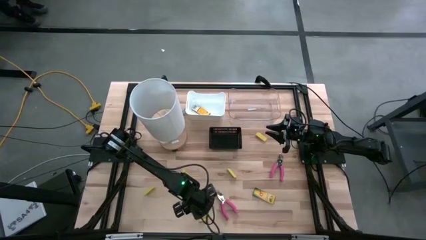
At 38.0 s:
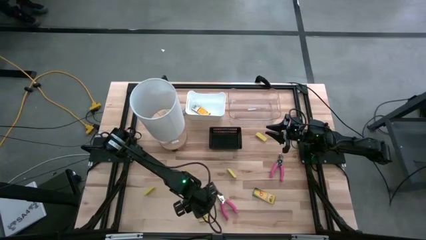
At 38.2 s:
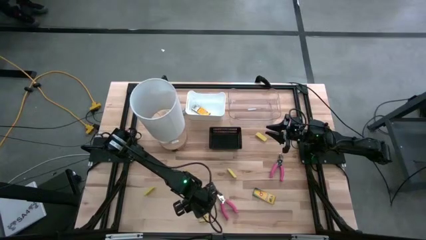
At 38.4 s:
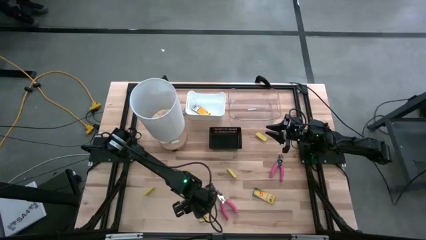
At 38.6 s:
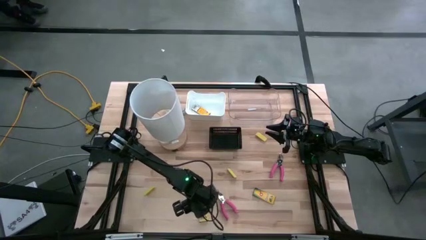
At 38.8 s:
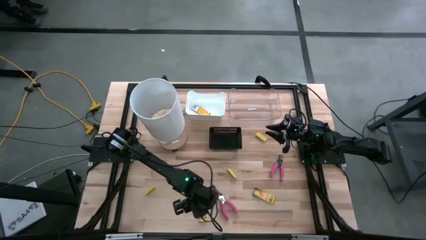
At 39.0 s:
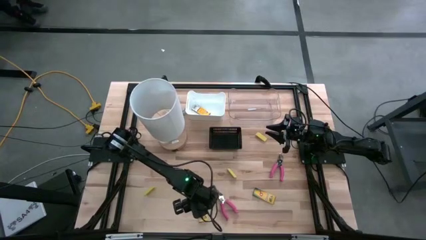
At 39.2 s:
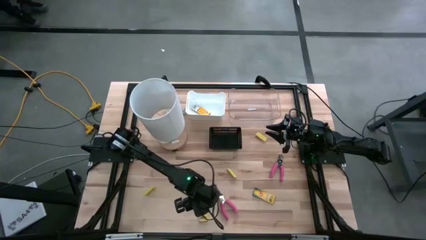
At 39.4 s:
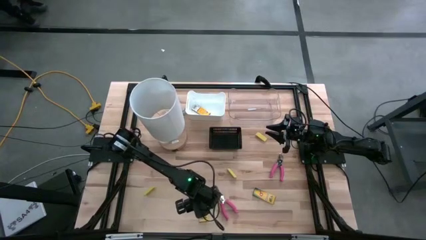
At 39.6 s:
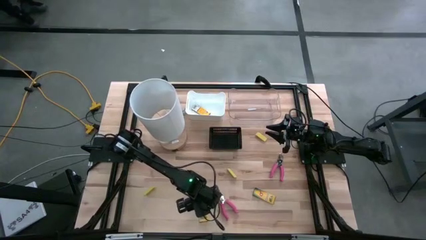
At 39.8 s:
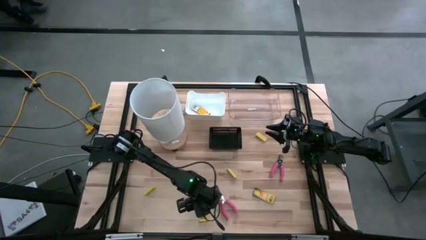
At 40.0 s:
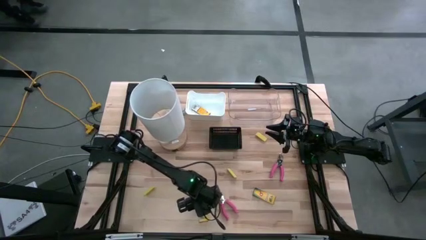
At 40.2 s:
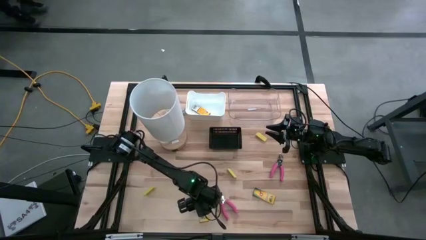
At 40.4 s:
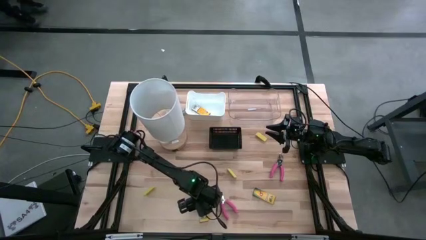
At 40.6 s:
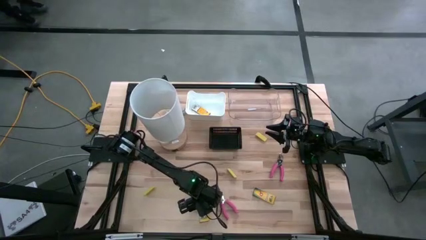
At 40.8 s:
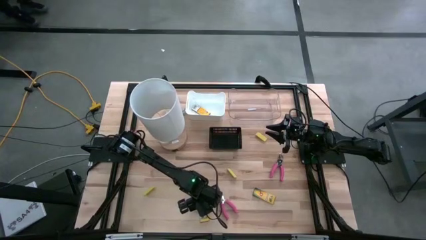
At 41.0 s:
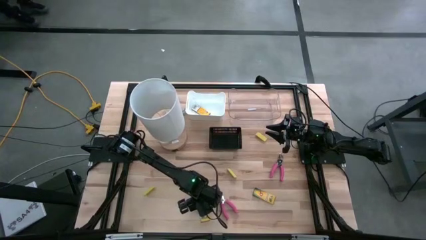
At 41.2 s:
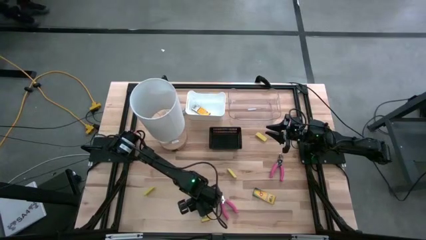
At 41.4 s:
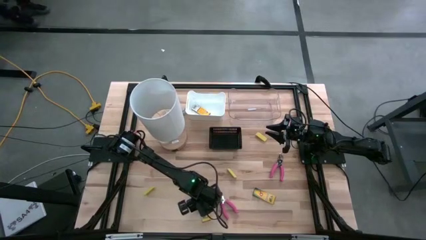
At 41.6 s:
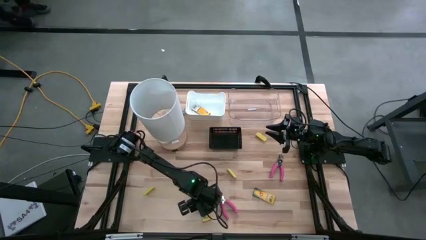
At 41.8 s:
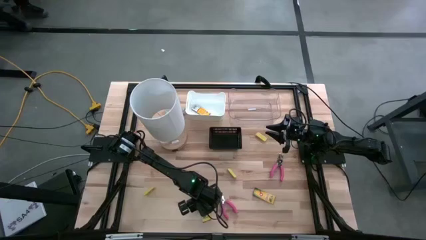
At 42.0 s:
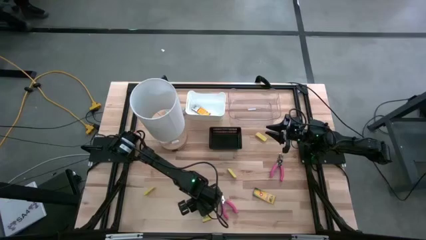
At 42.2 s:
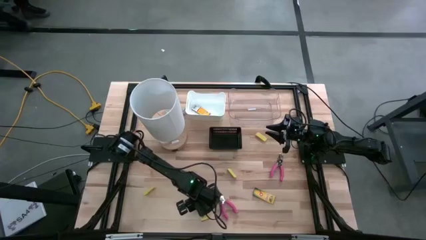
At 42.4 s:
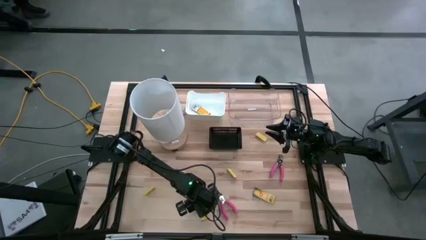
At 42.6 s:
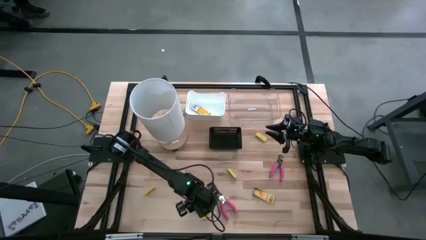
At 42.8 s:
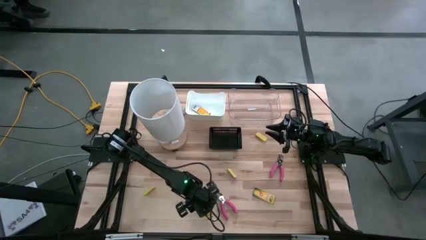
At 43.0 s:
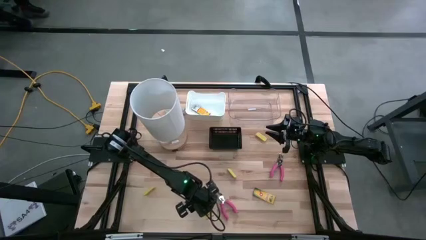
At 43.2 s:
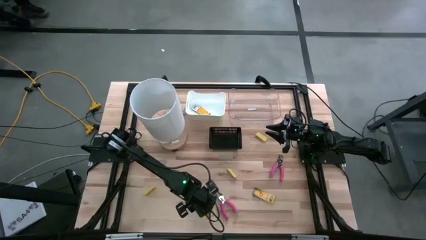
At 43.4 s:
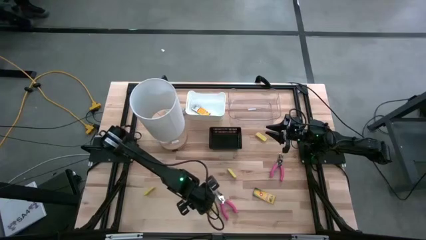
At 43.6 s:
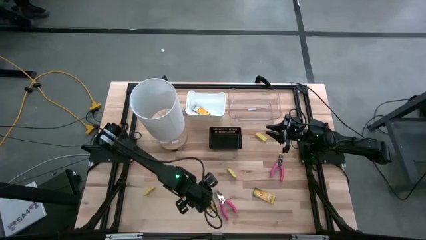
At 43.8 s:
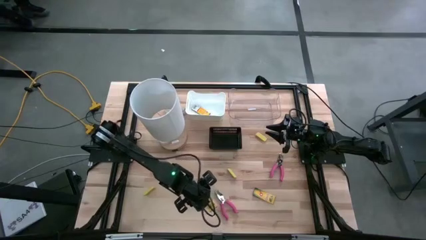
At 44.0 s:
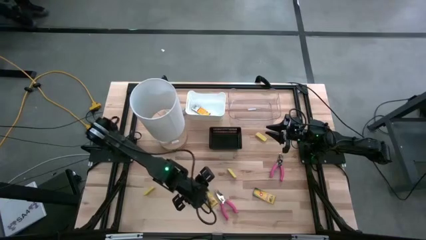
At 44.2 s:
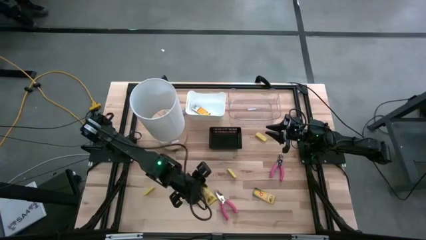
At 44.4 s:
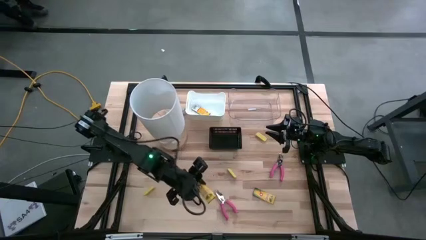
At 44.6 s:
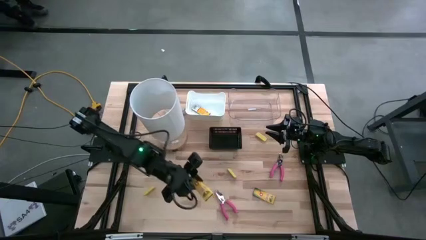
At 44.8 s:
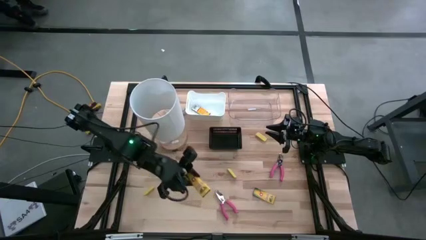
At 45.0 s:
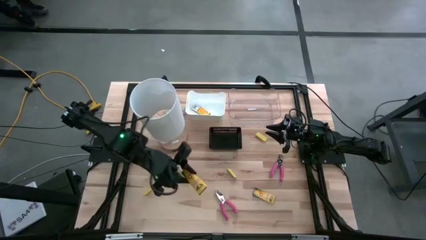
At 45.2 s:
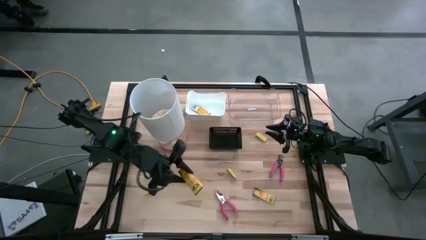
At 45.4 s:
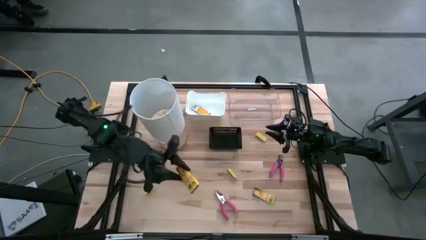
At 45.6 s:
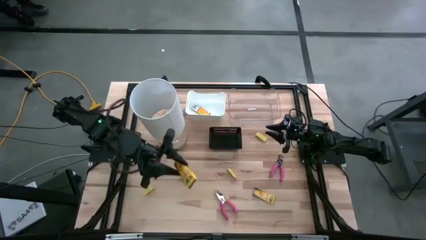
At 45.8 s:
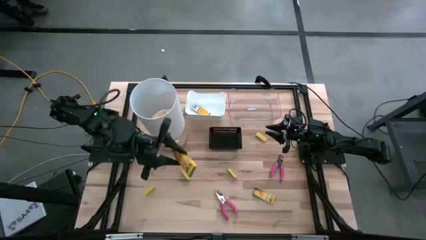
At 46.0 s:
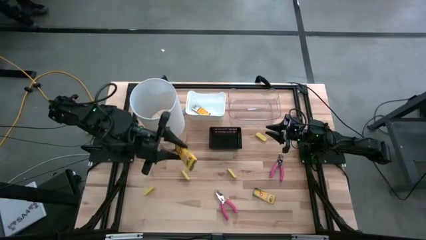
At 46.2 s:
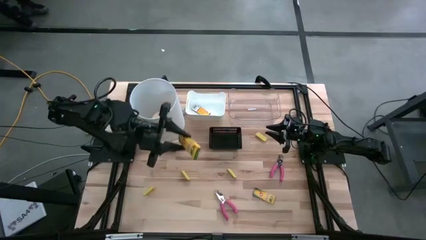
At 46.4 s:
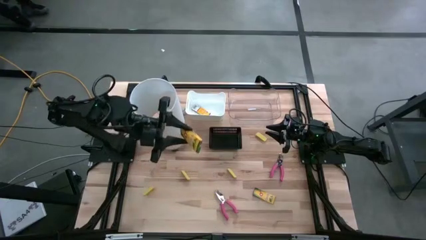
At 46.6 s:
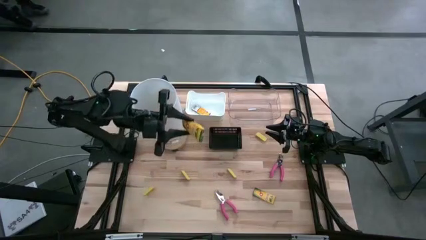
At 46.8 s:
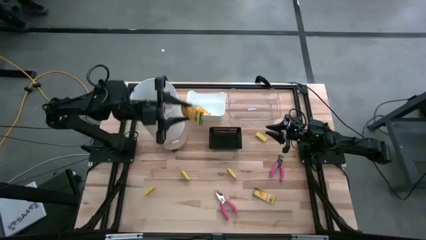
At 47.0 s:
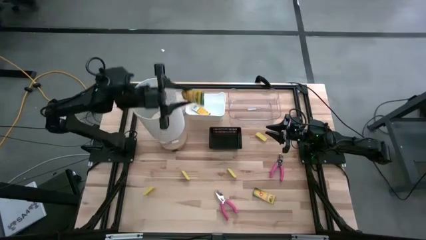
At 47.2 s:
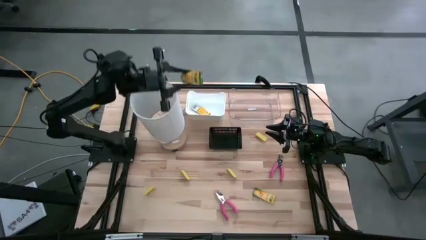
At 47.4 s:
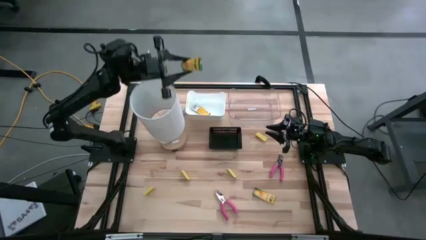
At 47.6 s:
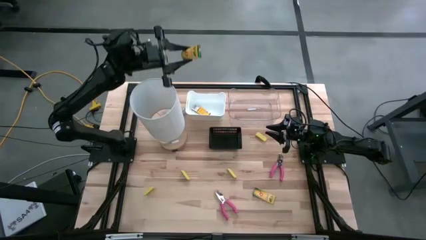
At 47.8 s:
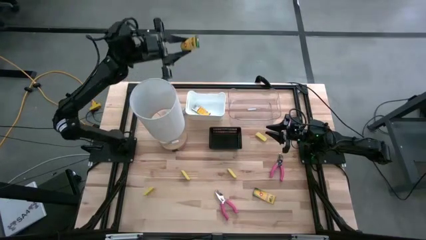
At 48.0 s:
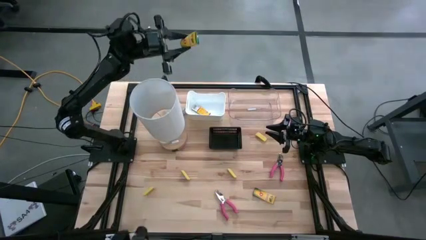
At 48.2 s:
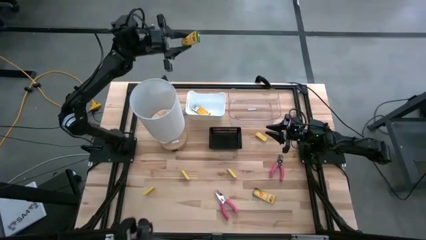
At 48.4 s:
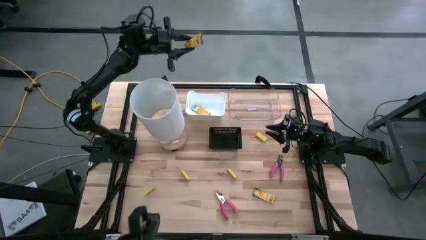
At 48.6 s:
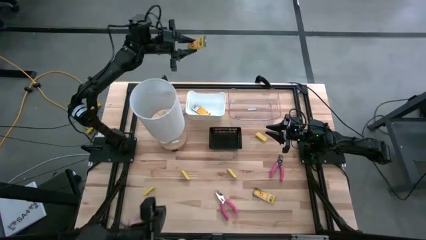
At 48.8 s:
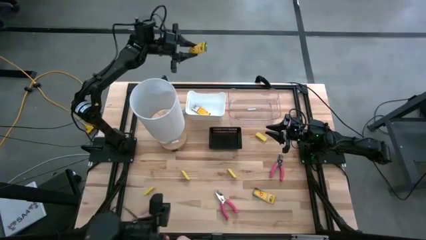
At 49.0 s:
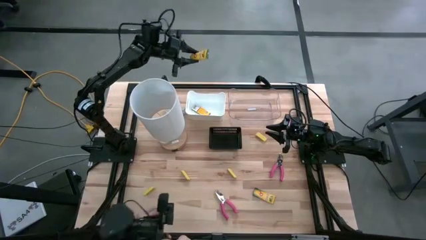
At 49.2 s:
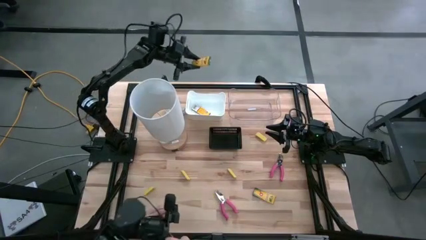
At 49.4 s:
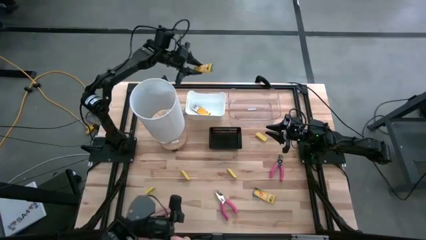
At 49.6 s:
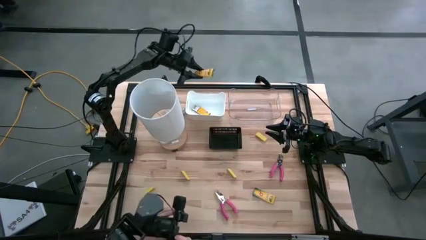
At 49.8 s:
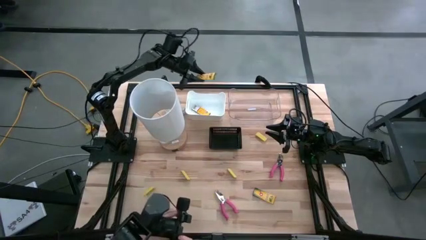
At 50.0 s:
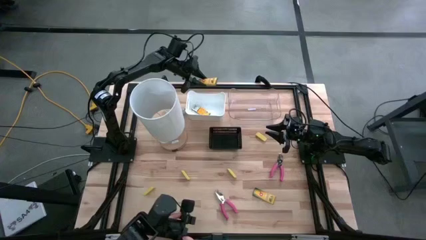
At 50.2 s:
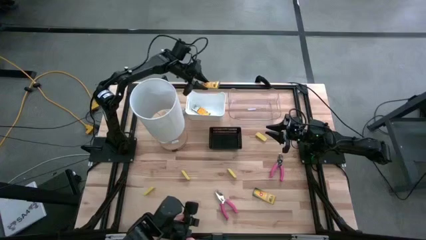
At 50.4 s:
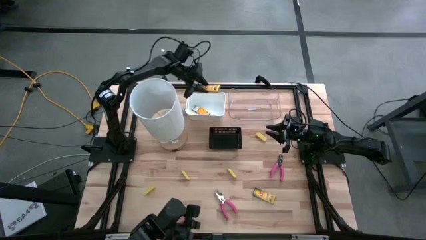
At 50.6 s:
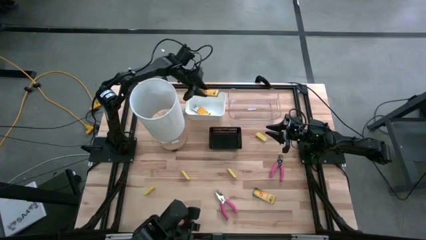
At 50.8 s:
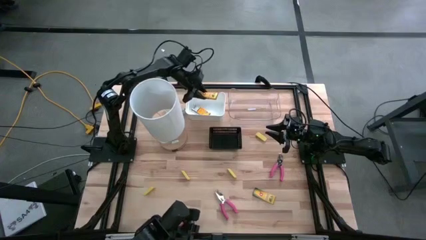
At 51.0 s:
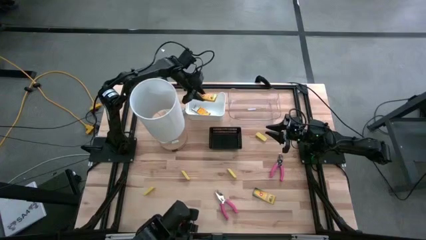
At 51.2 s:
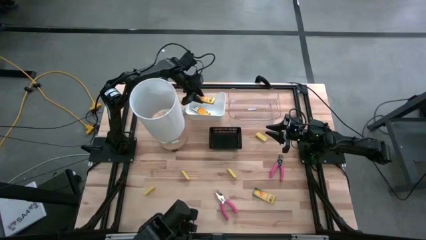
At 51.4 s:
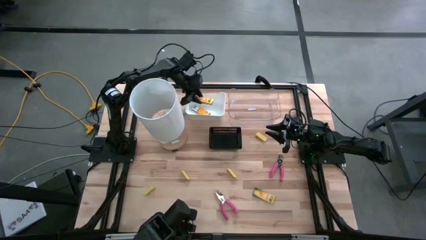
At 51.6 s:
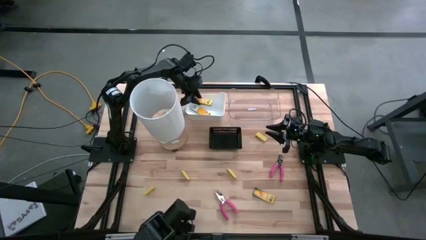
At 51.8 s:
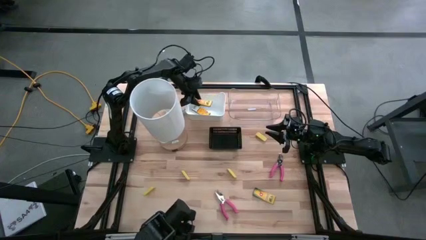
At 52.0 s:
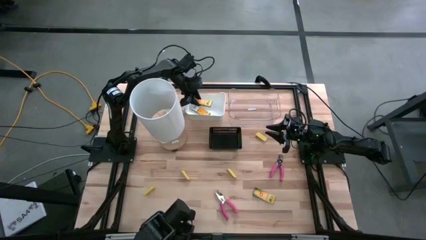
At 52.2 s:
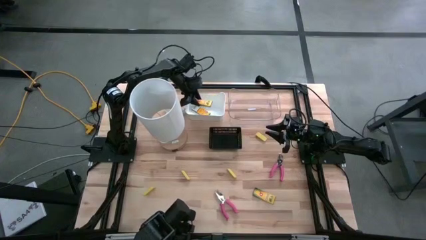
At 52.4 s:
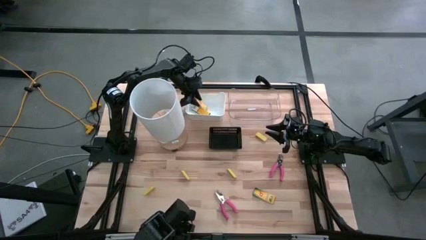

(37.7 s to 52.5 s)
Task: Pick & Place School Supplies
Put the yellow crayon box into the white bin
